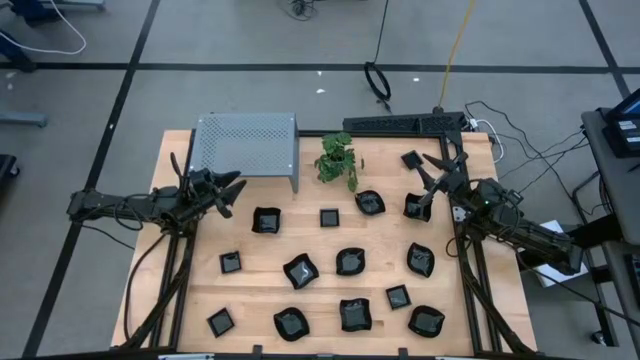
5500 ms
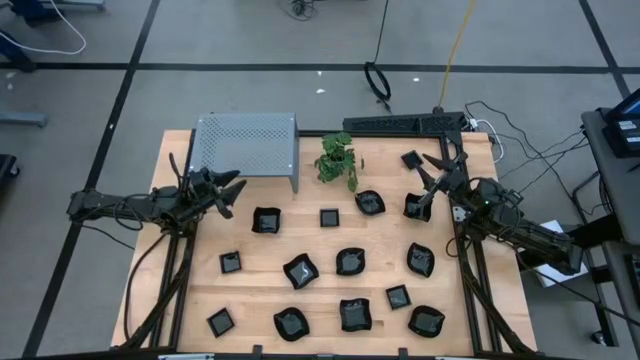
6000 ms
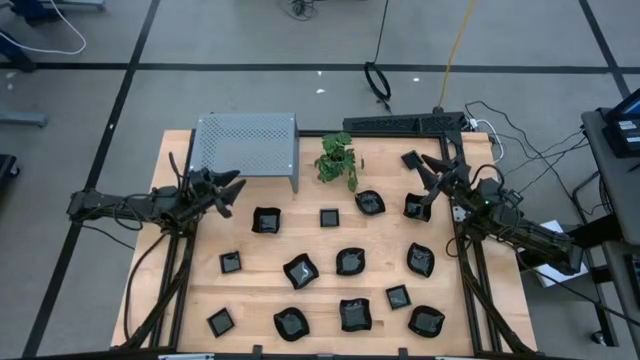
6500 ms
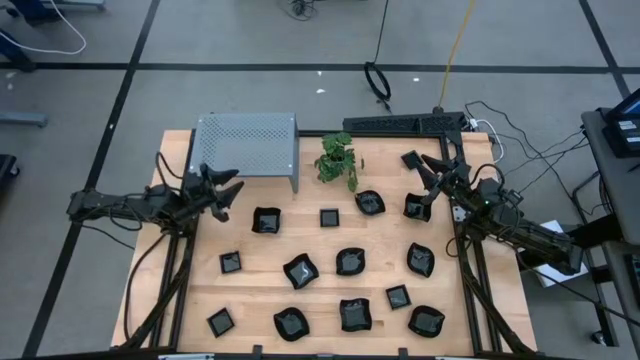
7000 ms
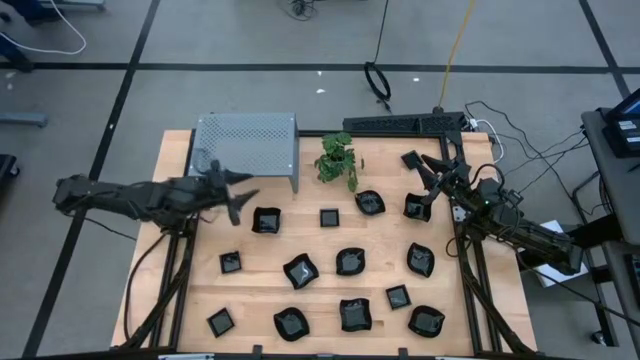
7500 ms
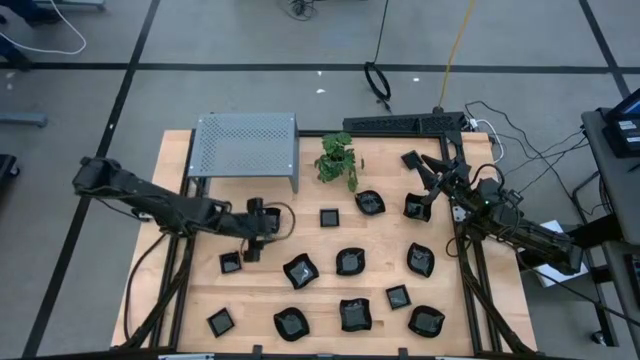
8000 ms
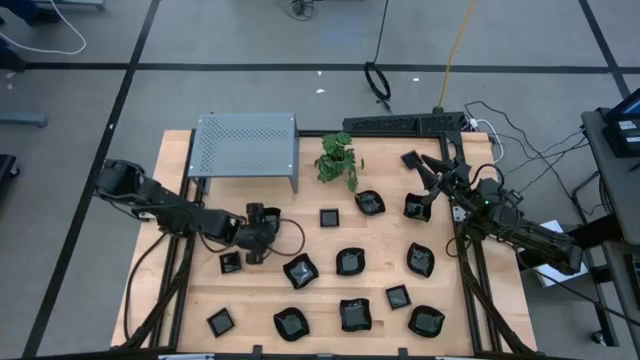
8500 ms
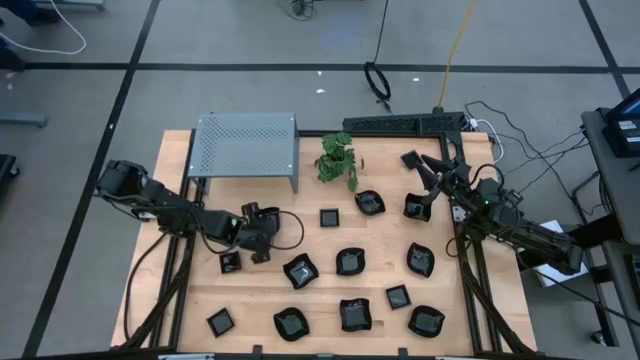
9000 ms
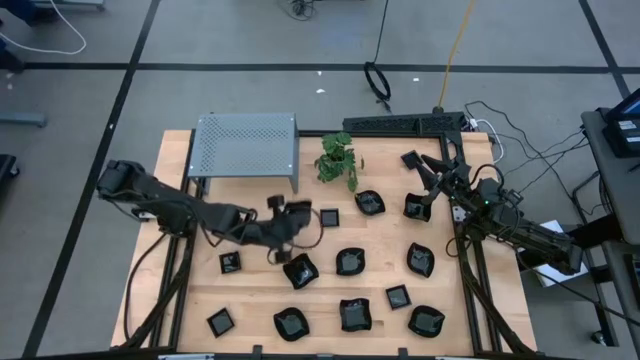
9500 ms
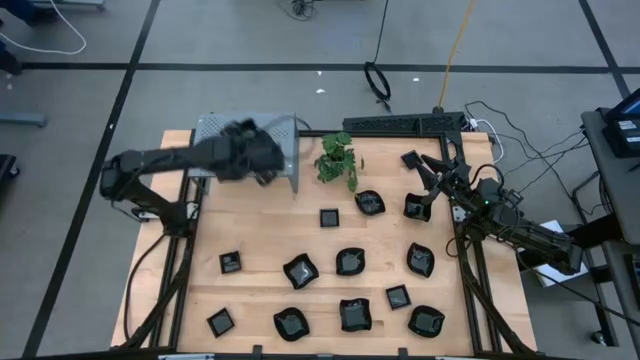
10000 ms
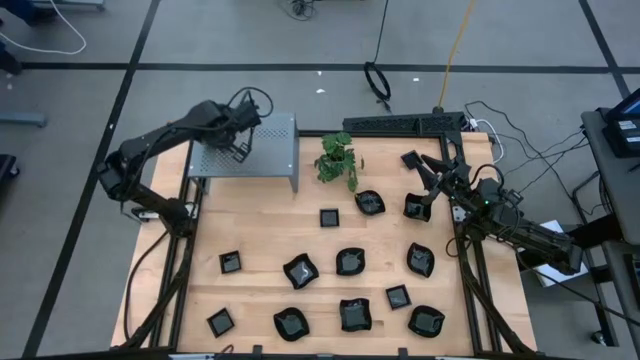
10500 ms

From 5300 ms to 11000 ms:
Task: Pick & Place Mini shaped plates
Put the distorted square plate on the shelf

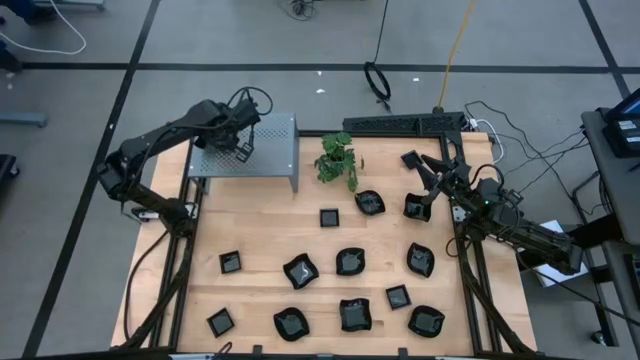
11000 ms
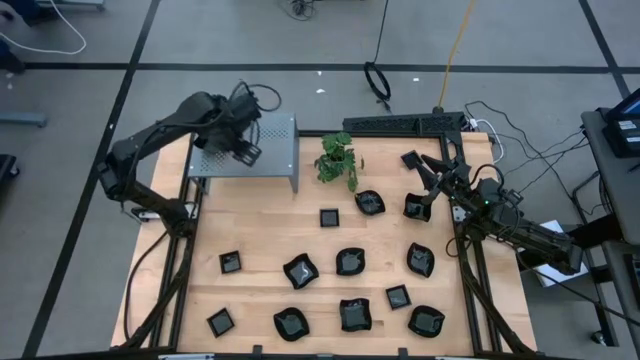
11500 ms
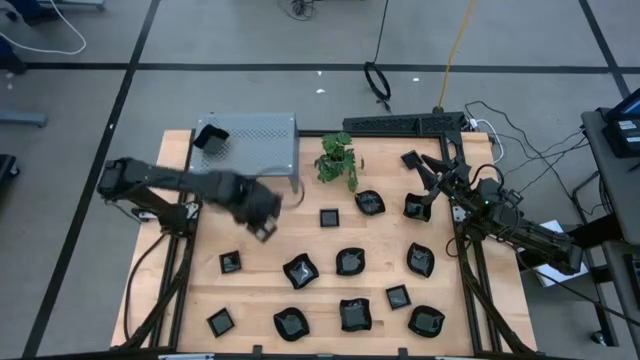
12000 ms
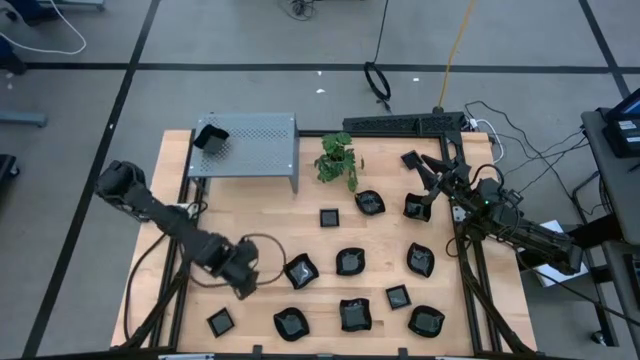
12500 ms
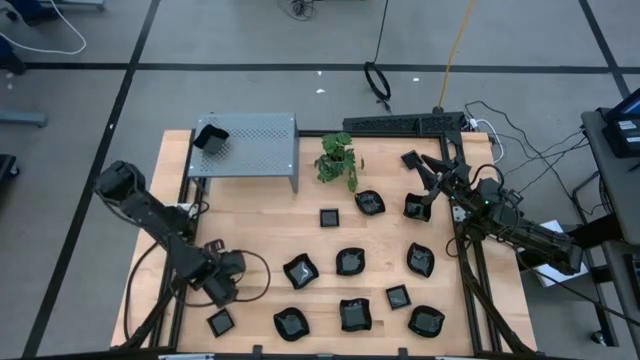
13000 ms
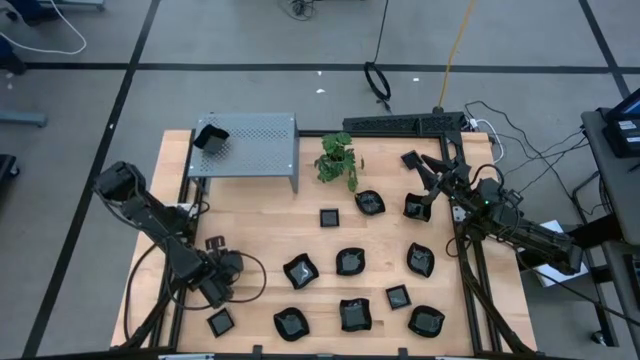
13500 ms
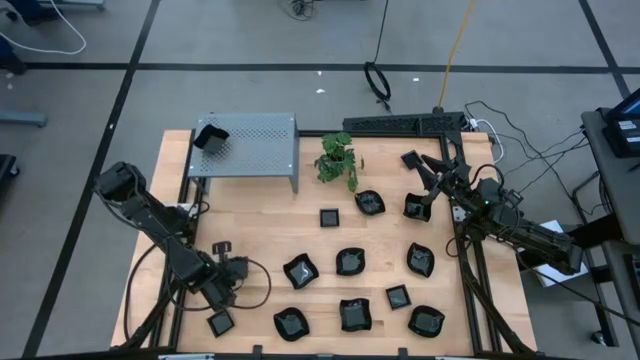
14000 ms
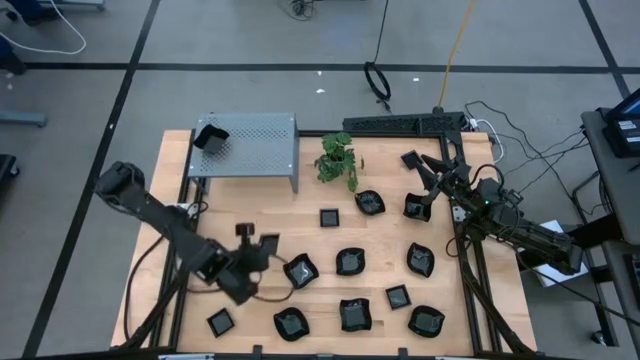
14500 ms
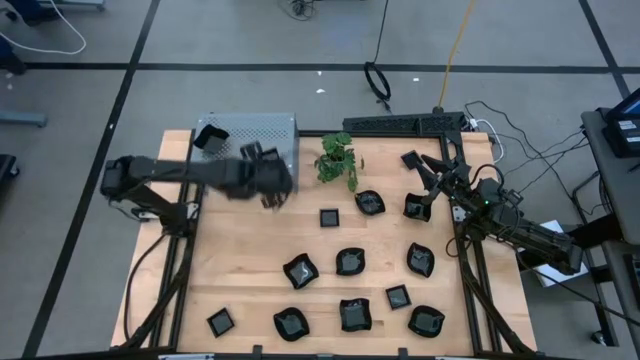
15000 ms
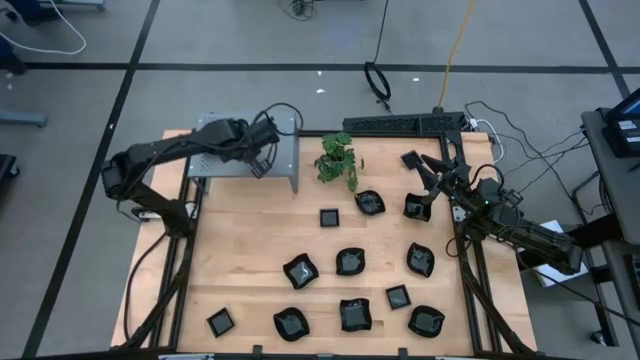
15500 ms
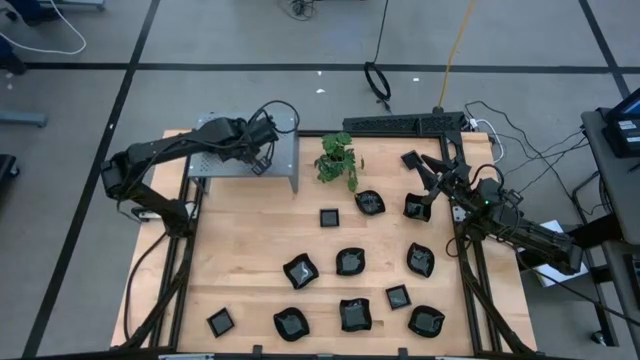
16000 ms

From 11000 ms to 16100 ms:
Put the square plate on the shelf

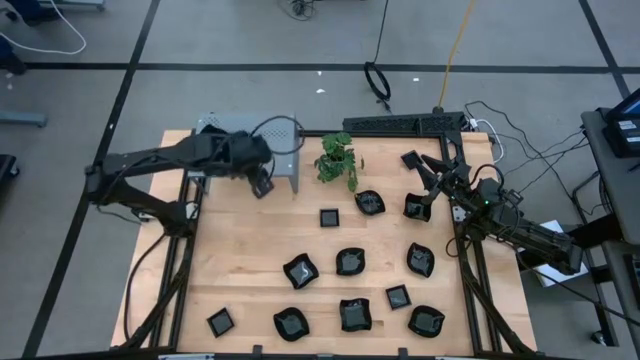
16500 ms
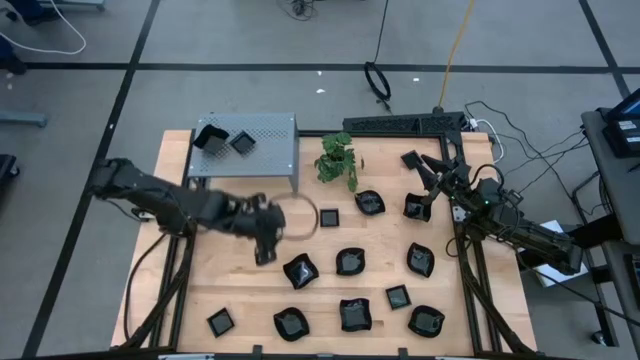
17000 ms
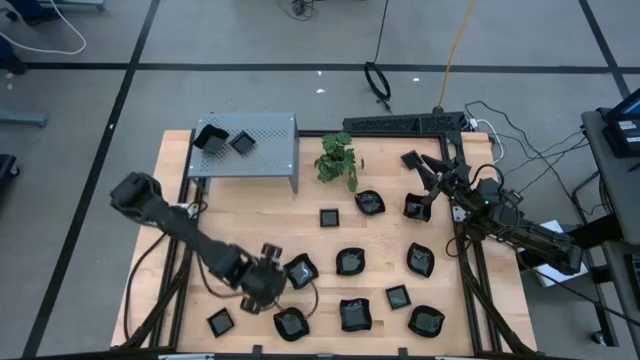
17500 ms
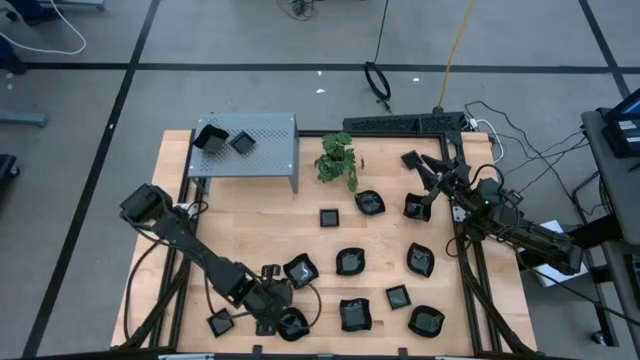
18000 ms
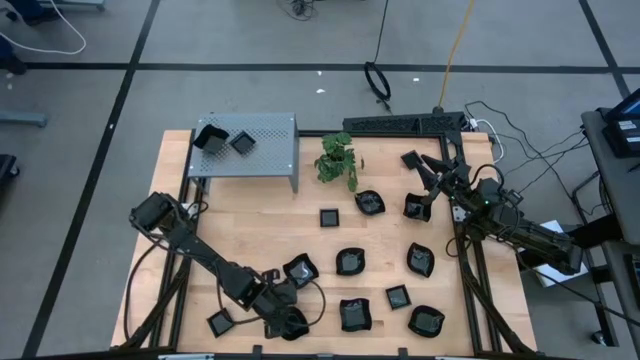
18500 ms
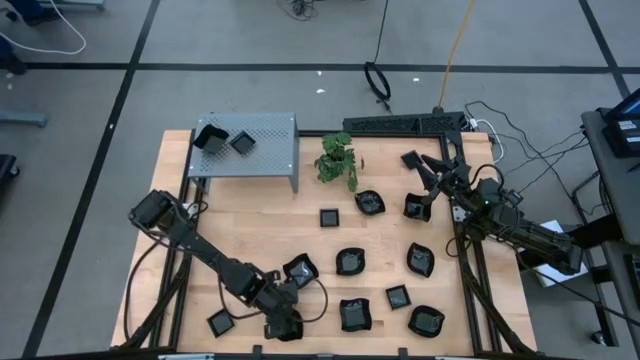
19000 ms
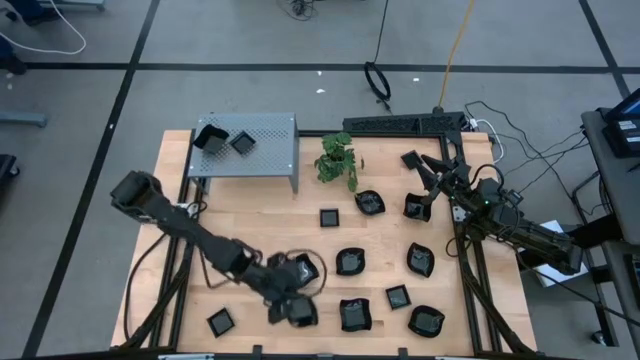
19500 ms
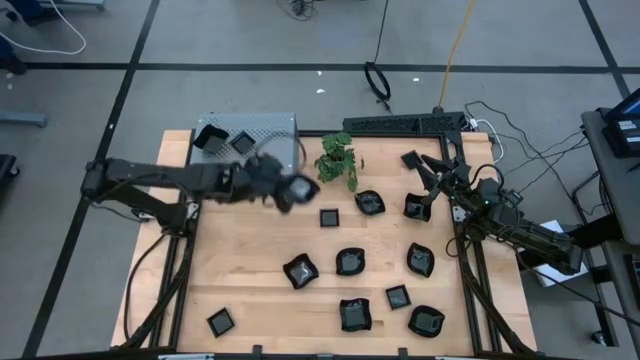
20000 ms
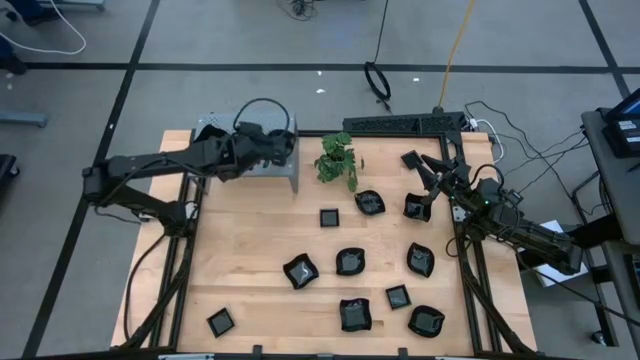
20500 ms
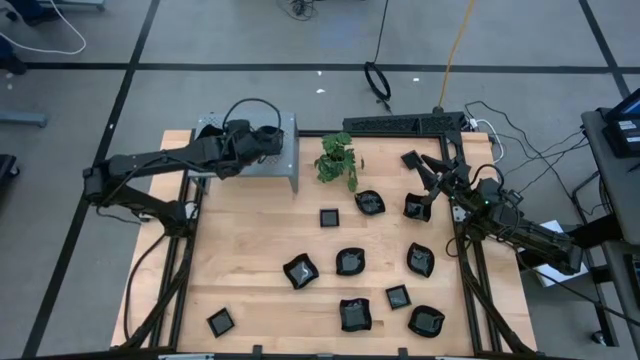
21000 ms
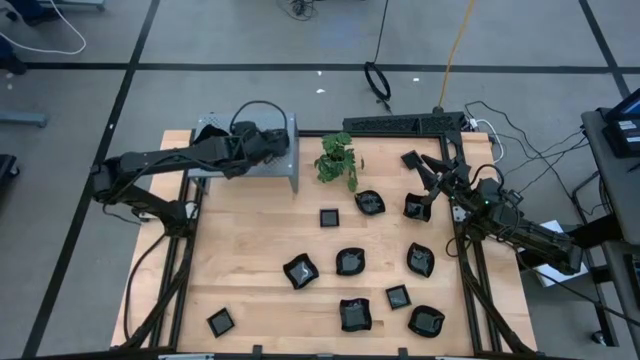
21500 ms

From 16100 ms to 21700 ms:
Put the leaf-shaped plate on the shelf

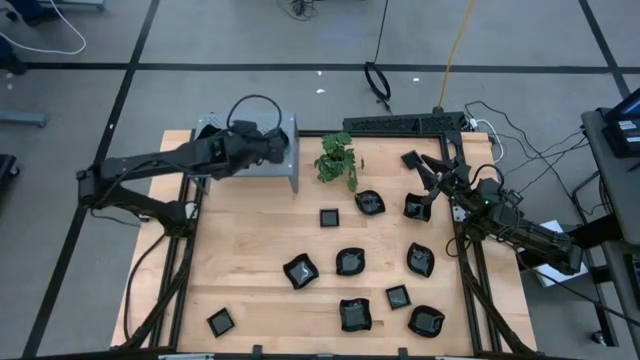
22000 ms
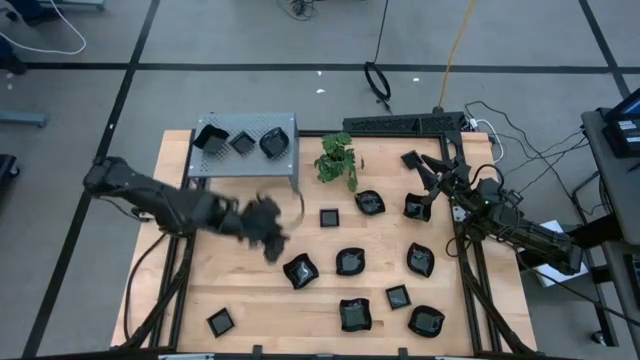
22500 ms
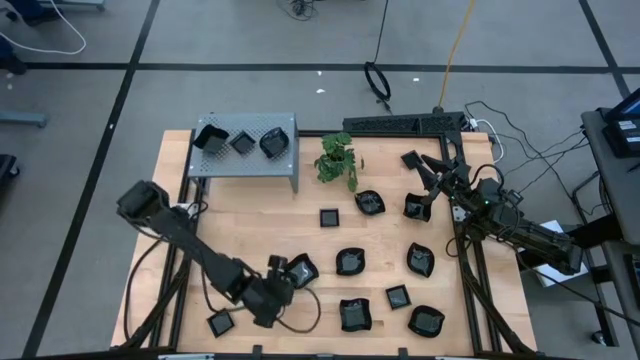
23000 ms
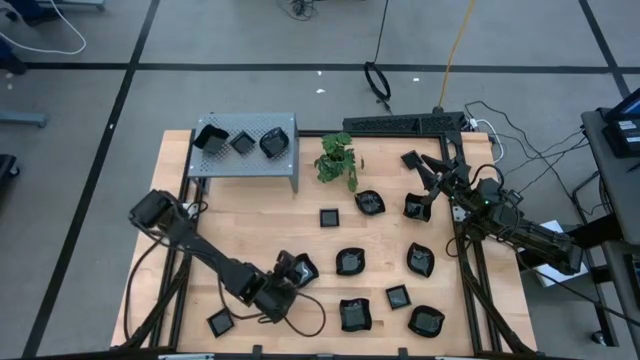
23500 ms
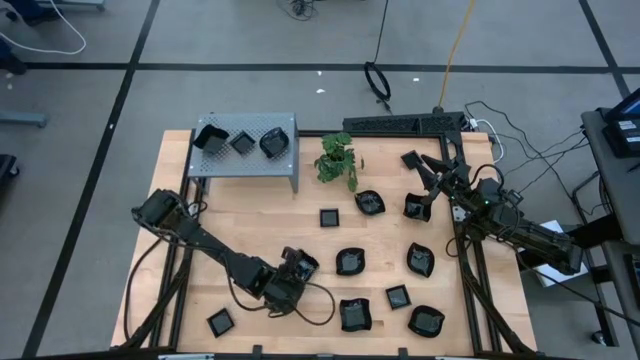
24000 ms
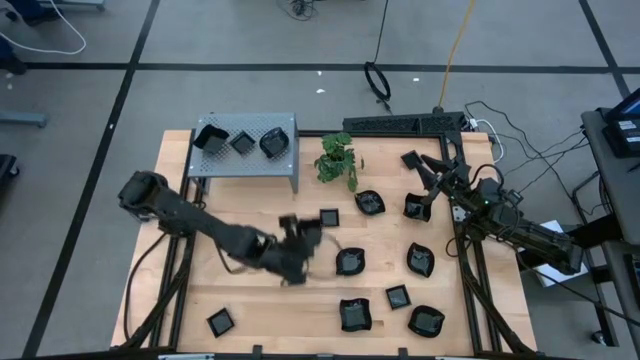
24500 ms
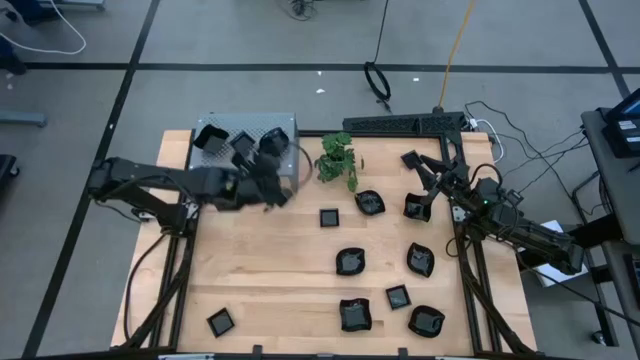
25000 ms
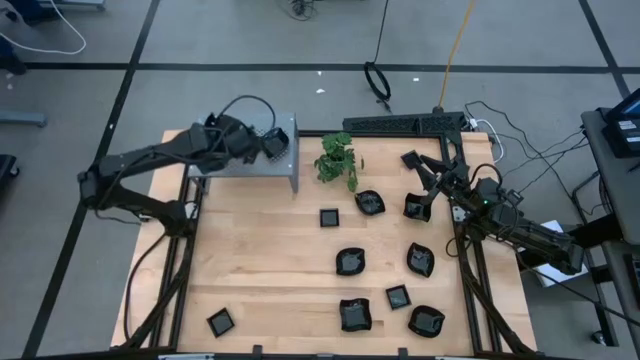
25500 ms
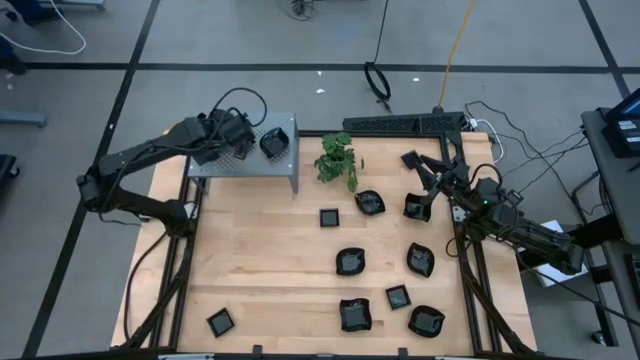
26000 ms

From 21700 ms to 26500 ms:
Stack the distorted square plate on top of the distorted square plate on the shelf
